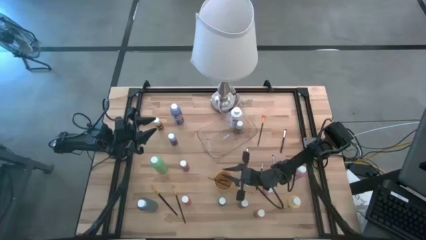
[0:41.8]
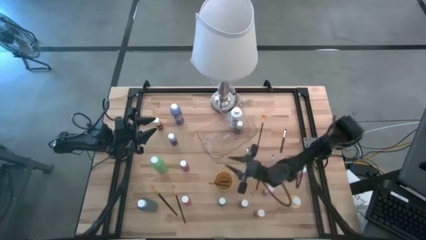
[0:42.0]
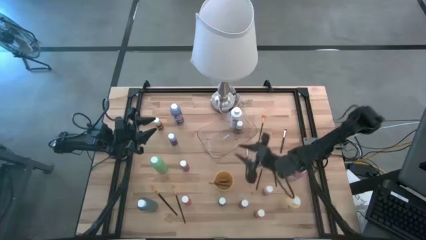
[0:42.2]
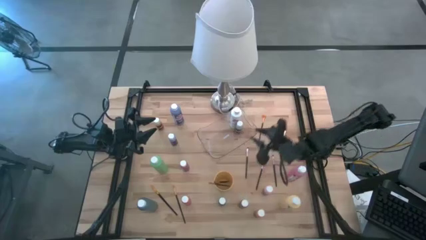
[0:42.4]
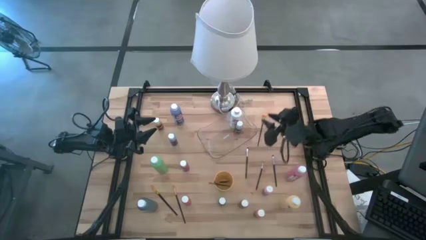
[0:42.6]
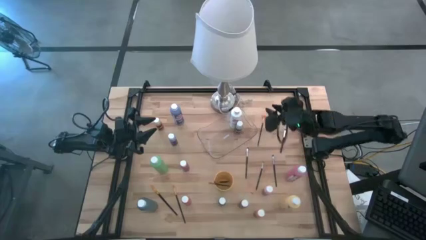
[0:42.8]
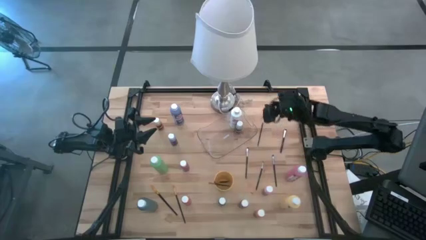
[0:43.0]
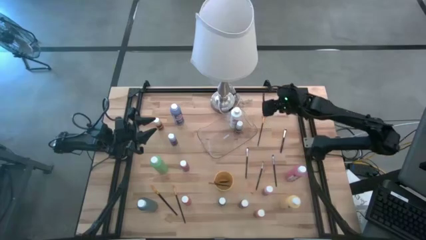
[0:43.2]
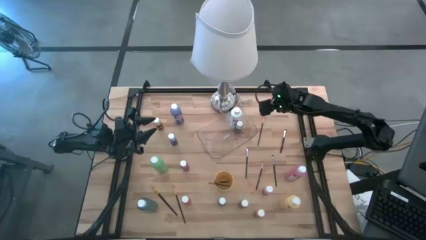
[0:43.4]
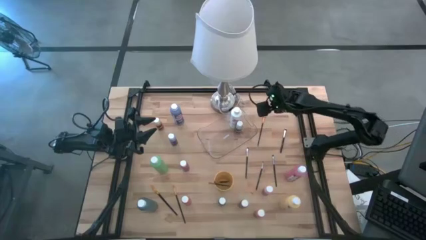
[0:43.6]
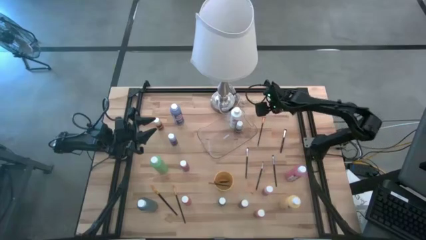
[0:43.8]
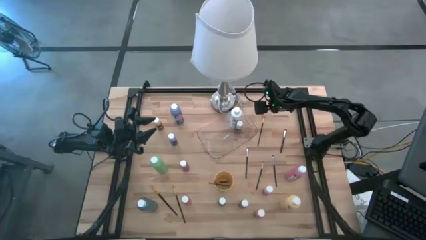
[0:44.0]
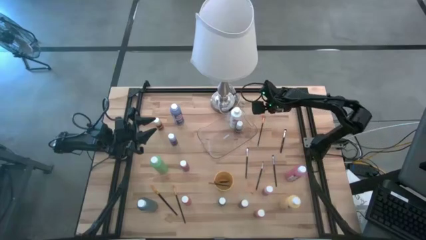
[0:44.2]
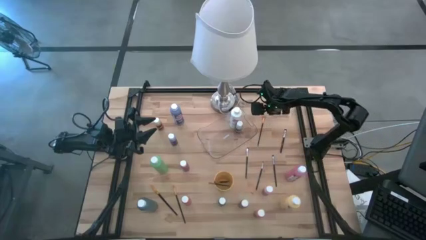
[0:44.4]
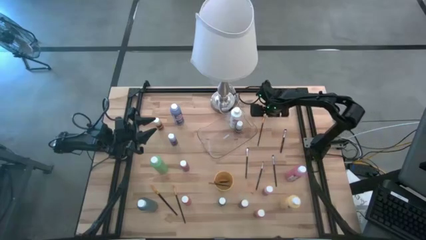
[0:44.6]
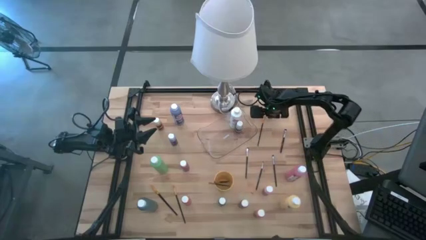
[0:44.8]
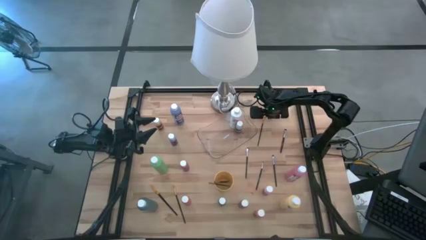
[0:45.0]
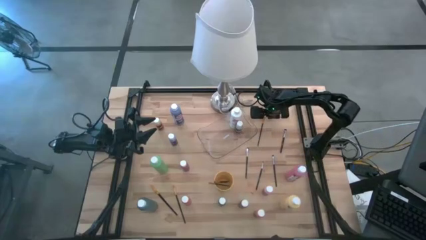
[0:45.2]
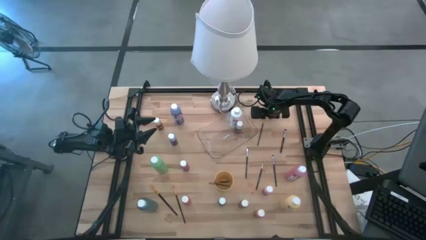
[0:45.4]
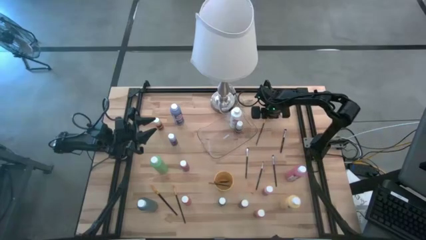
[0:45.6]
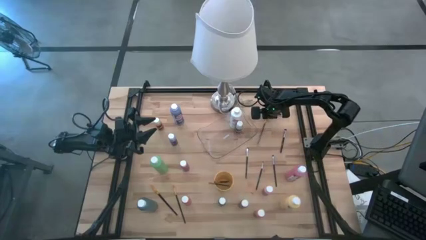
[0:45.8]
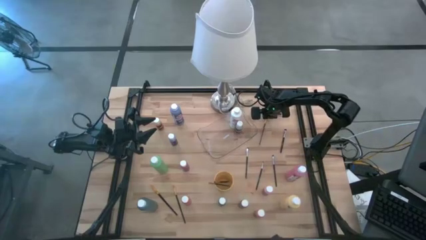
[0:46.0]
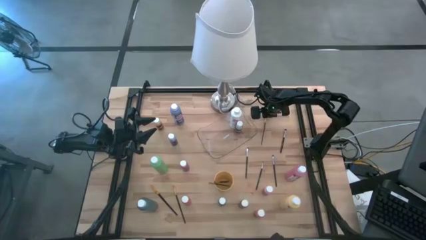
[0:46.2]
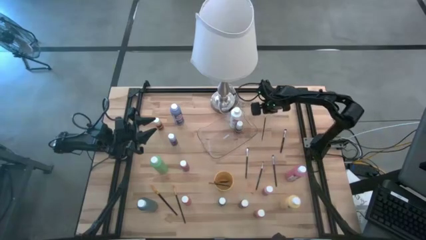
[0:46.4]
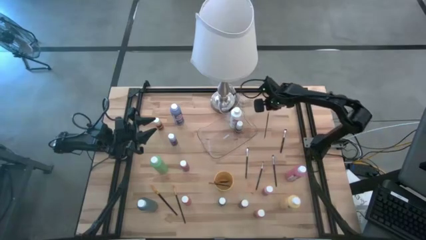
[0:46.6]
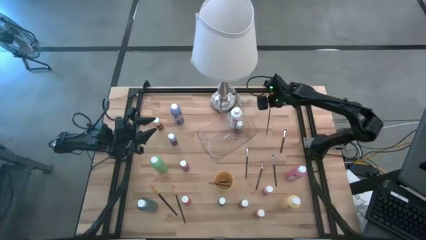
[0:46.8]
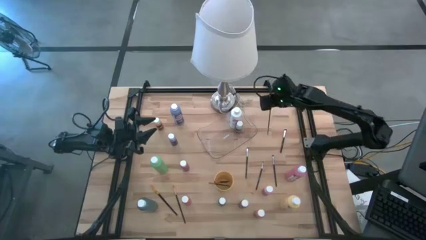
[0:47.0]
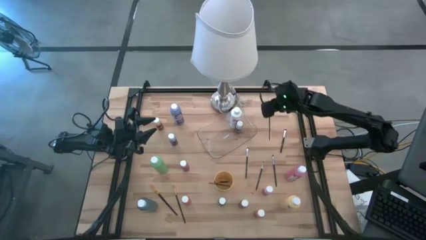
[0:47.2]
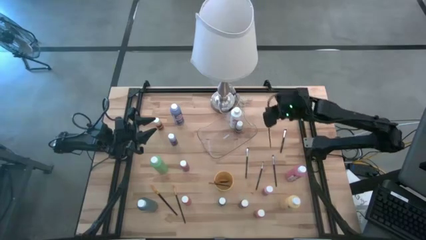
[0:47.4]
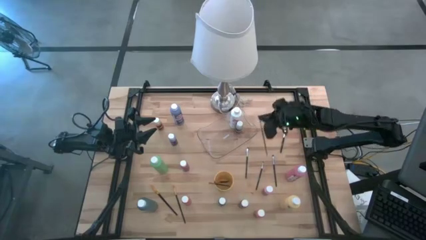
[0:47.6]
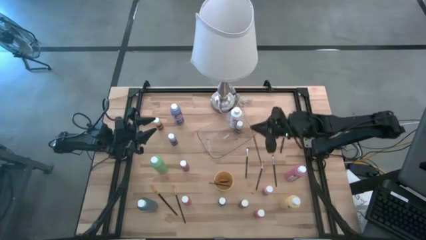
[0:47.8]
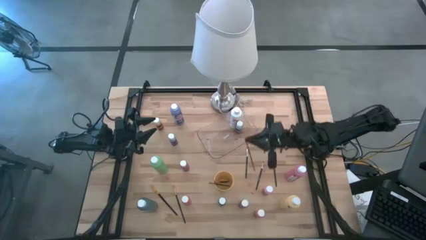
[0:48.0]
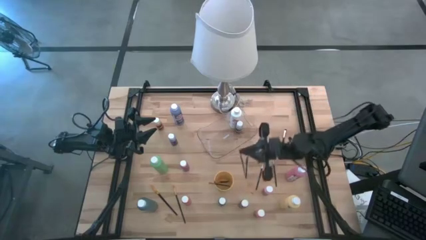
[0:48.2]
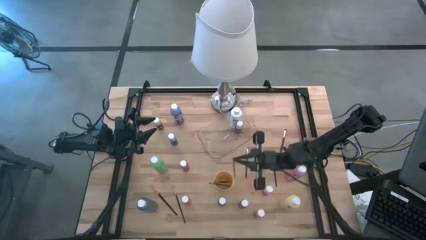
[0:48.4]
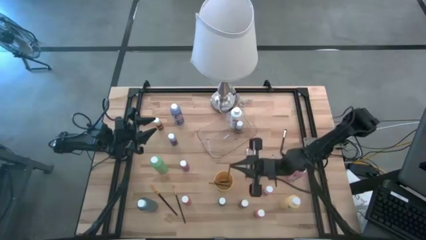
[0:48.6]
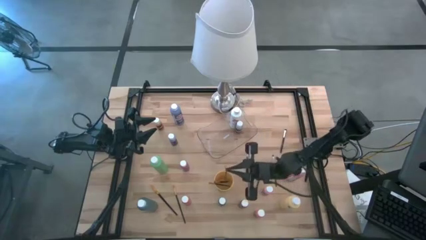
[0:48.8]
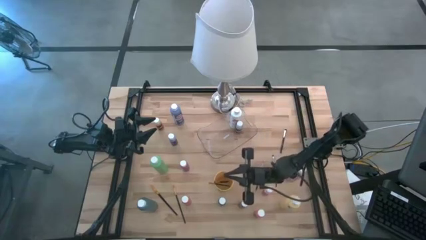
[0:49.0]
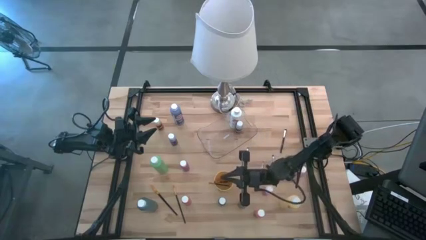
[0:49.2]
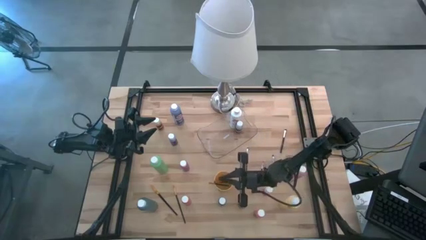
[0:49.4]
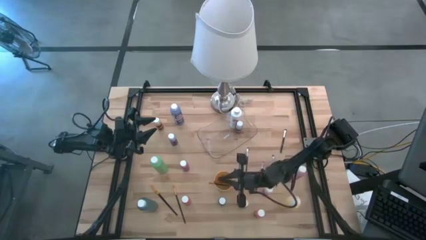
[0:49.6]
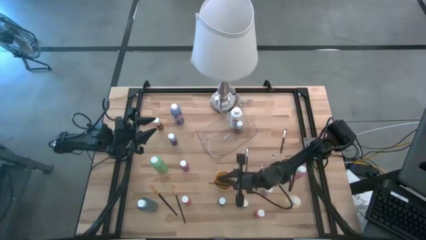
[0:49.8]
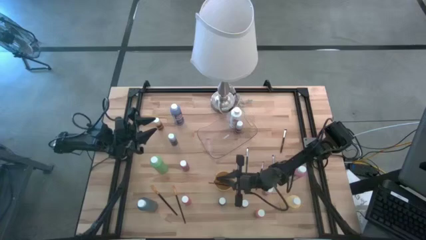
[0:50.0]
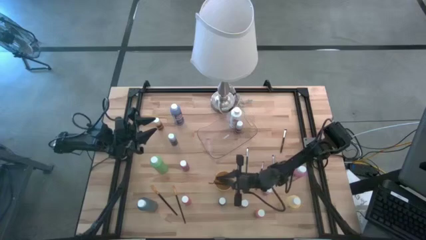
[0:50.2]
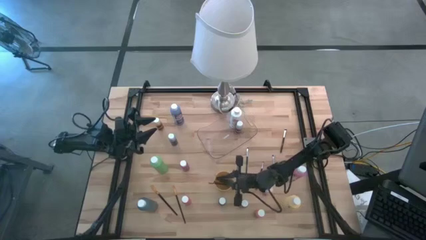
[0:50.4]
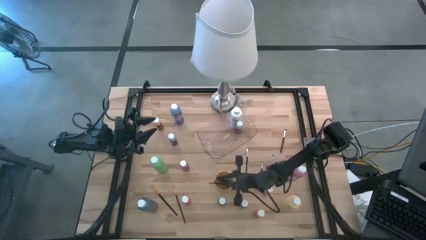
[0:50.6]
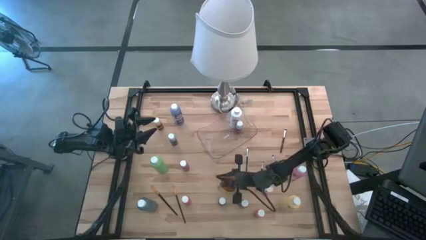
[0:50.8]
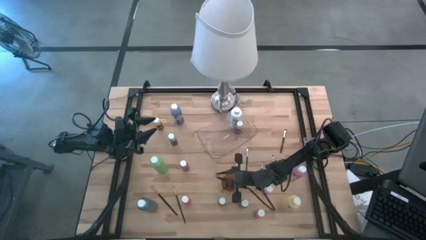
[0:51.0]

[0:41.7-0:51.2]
Task: Pick & Place Paint Supplies
Put the black paint brush into the yellow cup

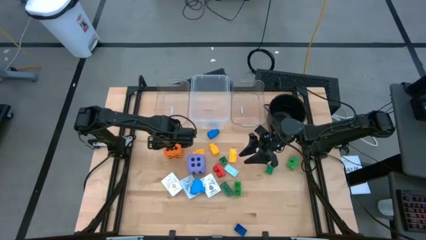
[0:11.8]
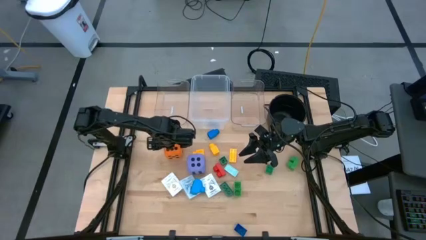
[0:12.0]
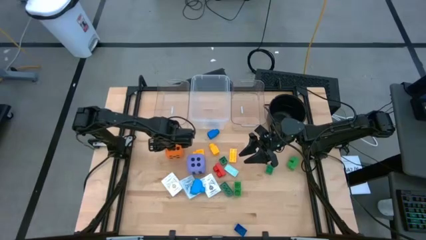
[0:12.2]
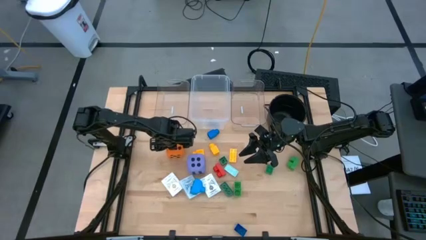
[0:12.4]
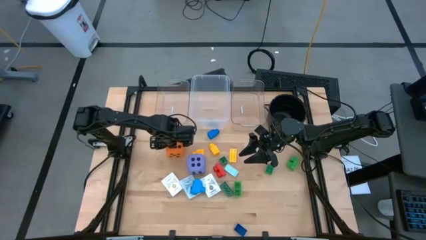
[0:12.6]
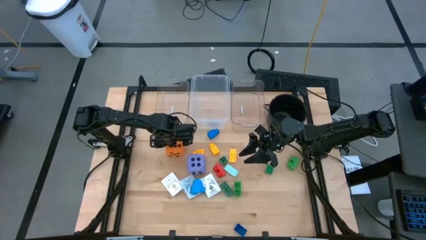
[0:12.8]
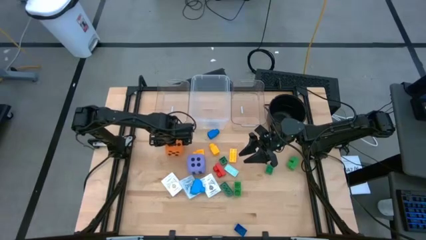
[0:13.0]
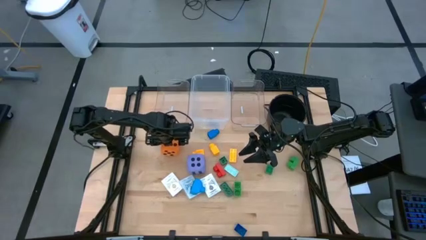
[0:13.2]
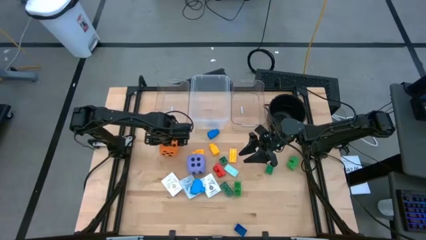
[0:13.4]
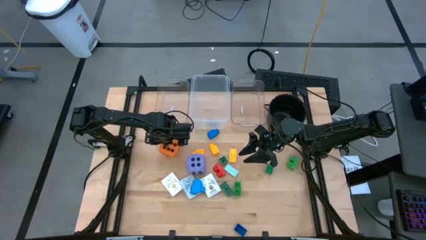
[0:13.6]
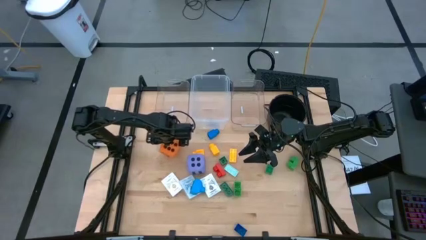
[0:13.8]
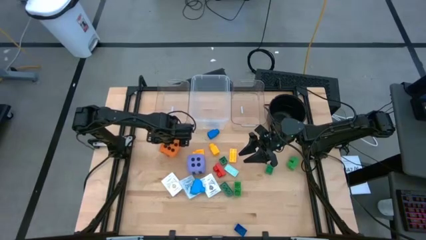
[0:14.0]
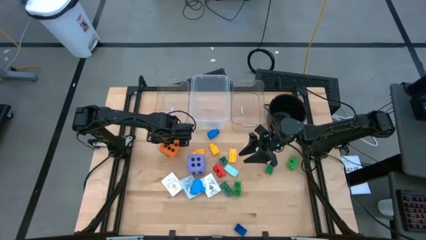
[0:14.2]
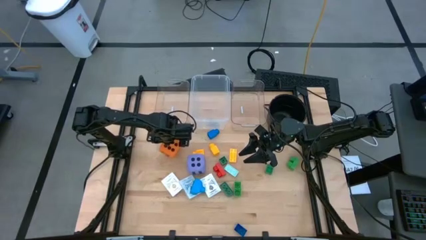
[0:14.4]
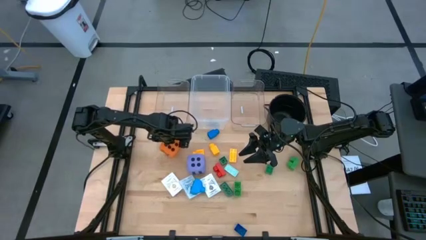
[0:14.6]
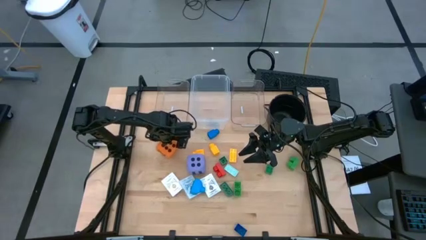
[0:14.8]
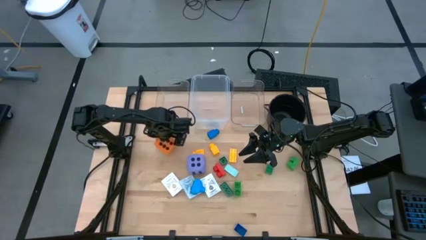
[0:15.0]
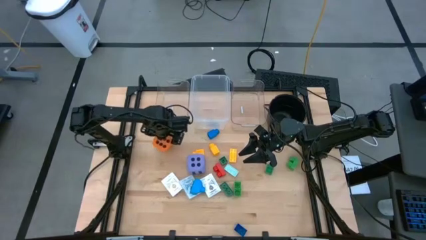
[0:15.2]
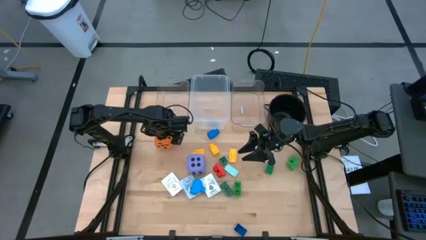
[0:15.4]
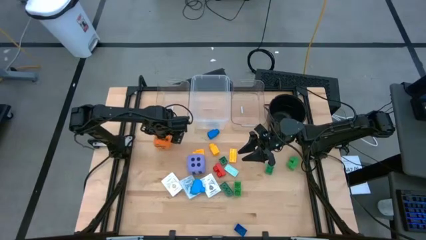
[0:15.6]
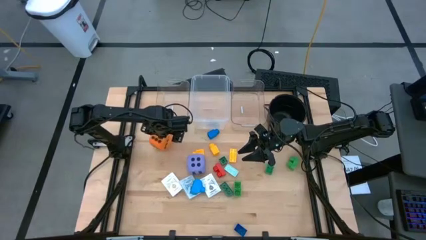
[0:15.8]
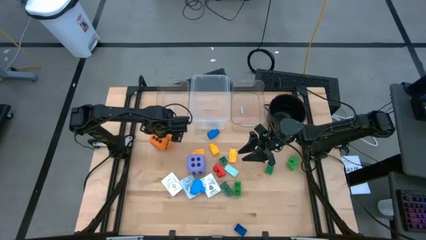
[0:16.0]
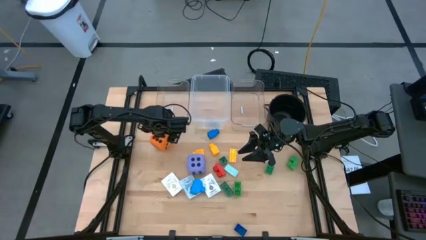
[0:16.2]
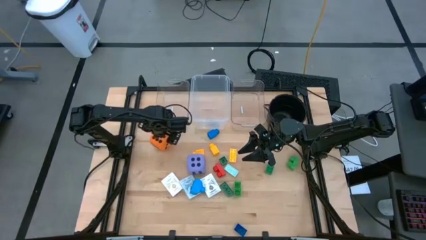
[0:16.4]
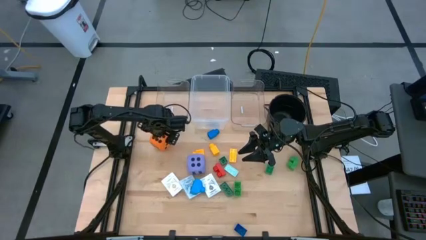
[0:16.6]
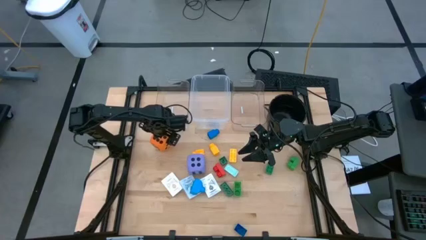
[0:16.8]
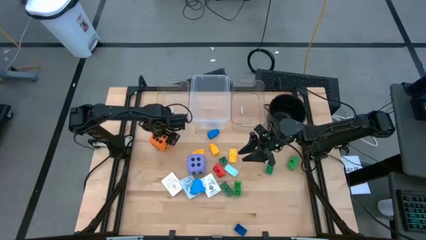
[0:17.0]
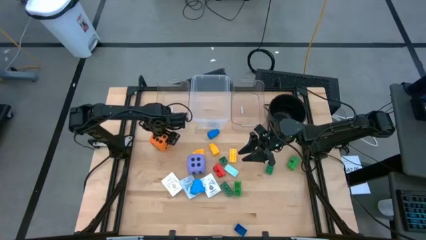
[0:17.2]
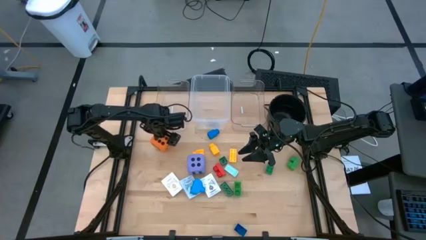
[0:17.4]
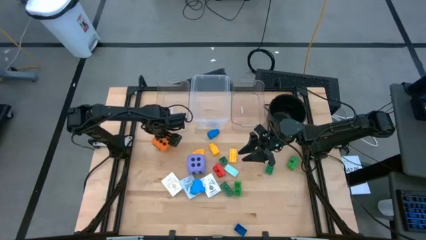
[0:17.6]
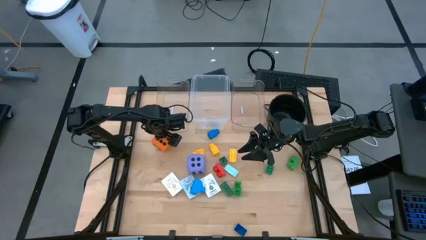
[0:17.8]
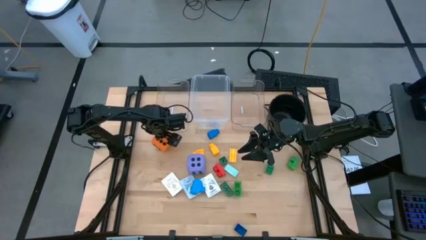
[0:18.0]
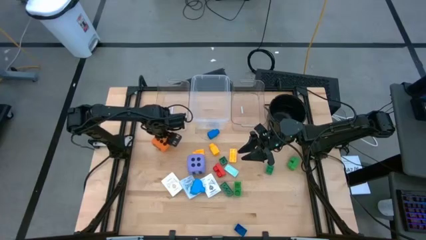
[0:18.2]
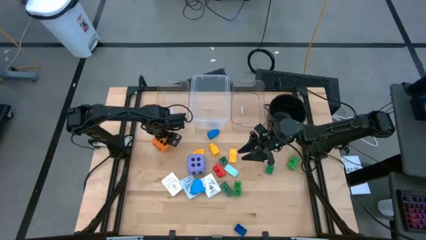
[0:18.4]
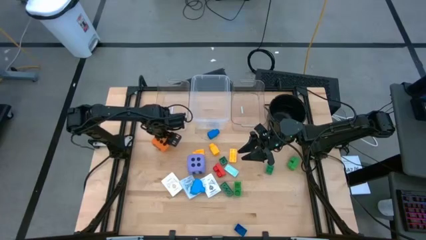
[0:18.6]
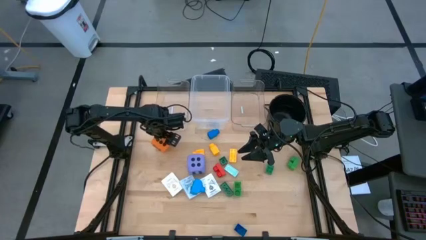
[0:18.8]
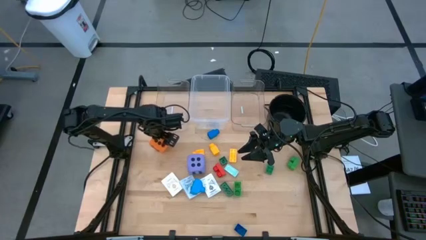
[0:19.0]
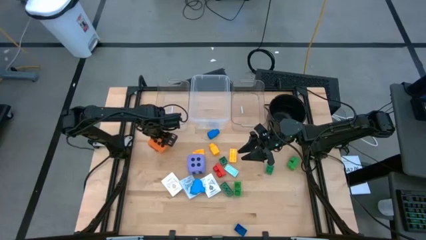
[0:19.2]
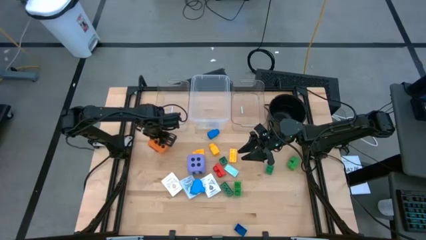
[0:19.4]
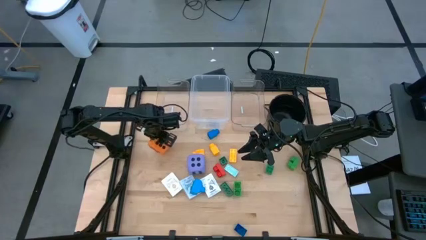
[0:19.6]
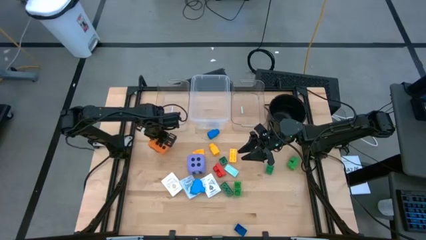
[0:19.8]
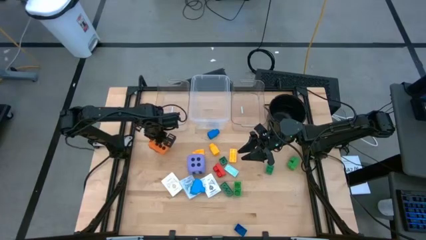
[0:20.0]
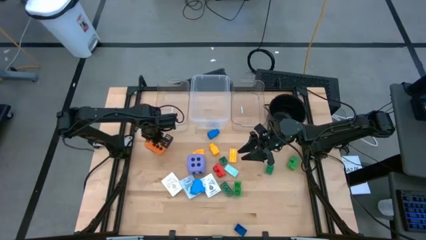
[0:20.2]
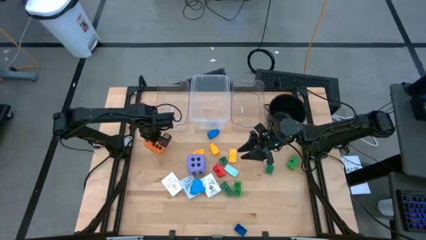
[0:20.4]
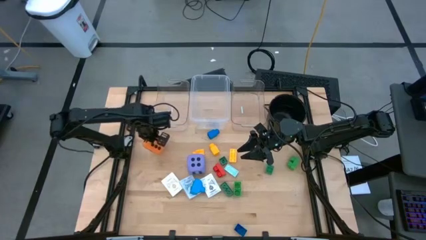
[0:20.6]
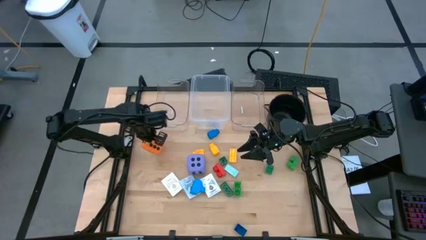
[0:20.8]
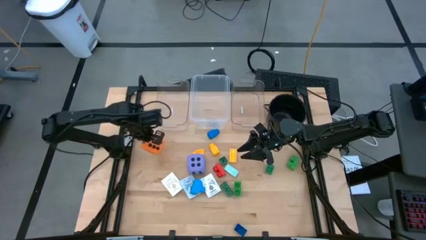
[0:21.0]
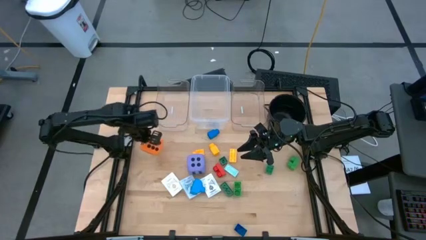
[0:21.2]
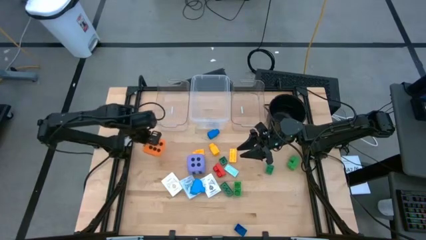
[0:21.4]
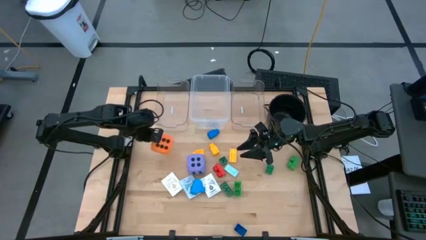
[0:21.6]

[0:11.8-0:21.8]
Task: Pick & Place Toys
Put the orange dice into the transparent container
